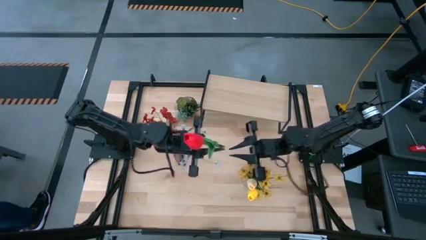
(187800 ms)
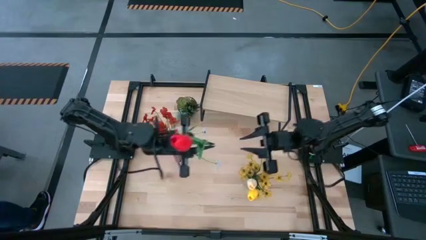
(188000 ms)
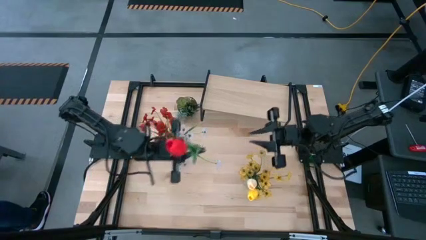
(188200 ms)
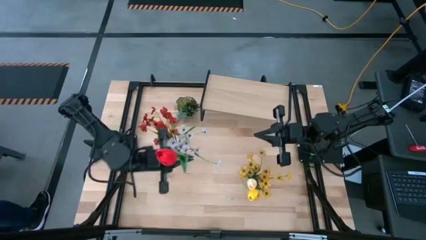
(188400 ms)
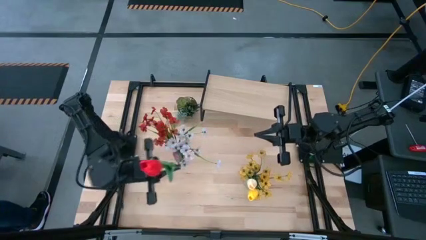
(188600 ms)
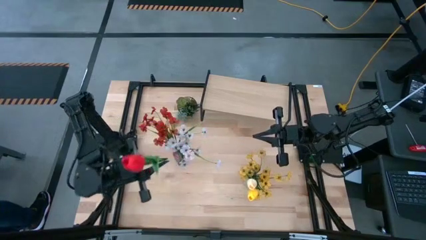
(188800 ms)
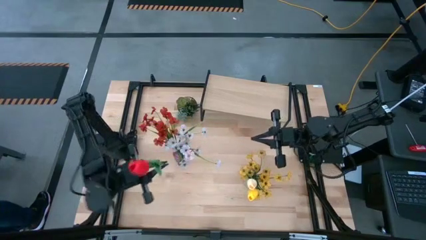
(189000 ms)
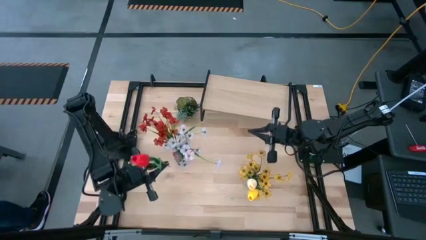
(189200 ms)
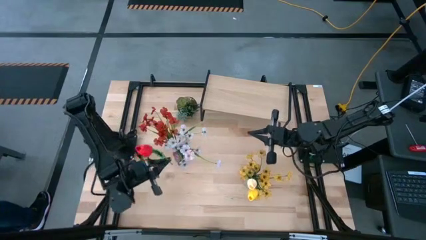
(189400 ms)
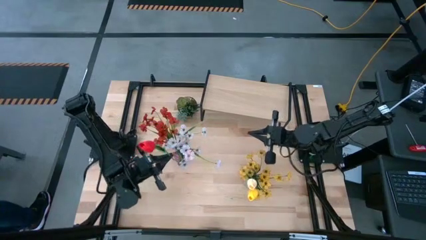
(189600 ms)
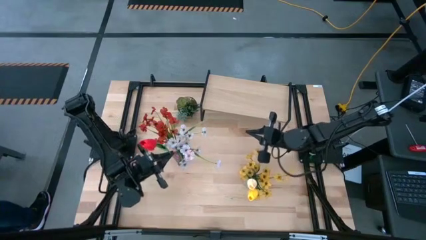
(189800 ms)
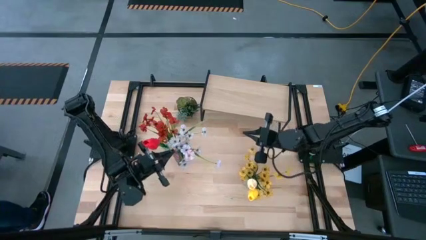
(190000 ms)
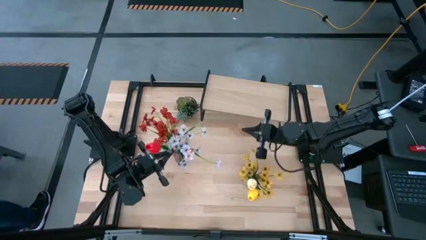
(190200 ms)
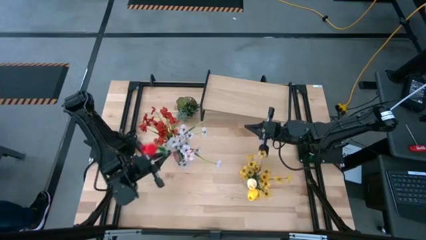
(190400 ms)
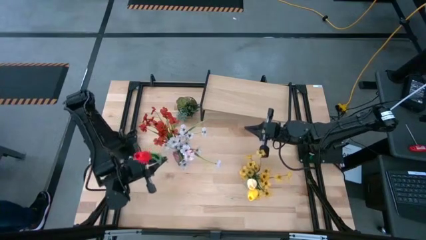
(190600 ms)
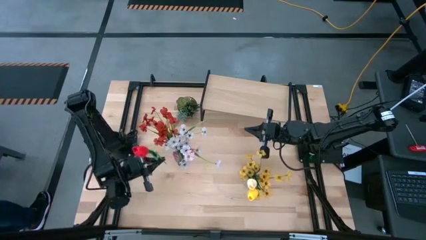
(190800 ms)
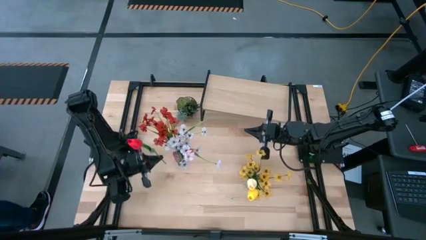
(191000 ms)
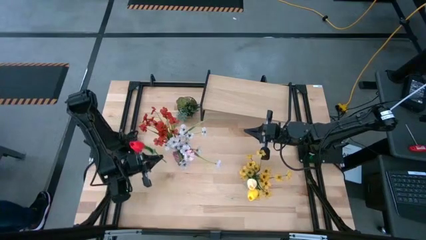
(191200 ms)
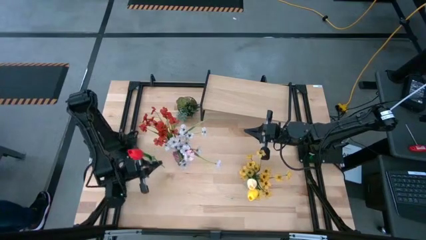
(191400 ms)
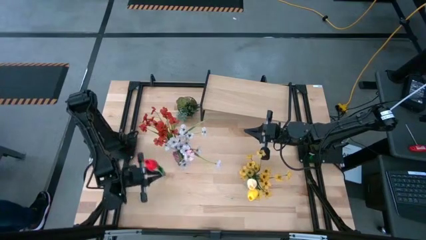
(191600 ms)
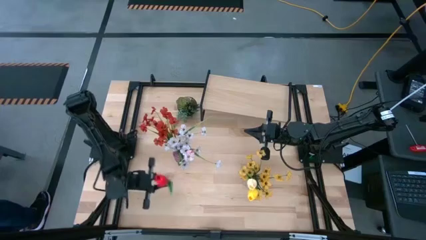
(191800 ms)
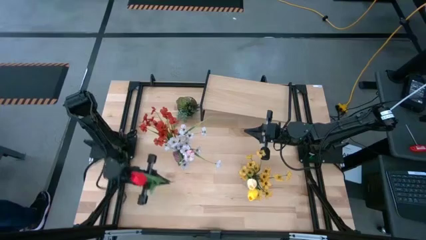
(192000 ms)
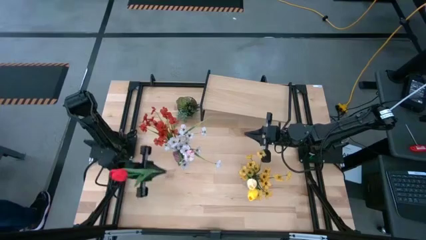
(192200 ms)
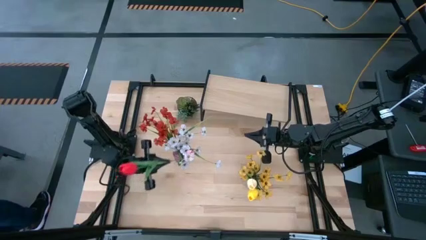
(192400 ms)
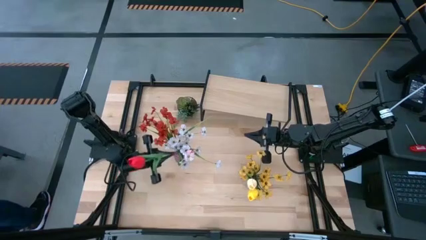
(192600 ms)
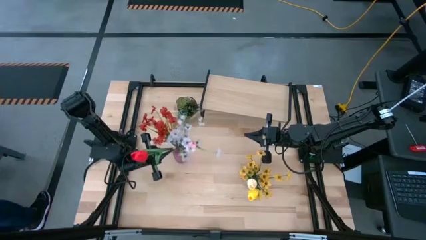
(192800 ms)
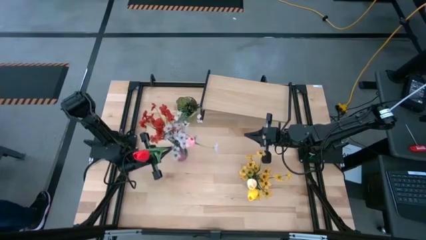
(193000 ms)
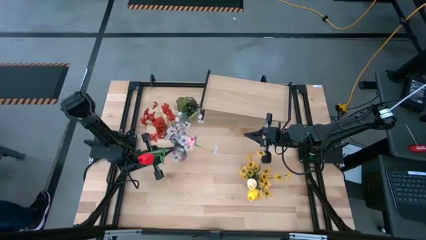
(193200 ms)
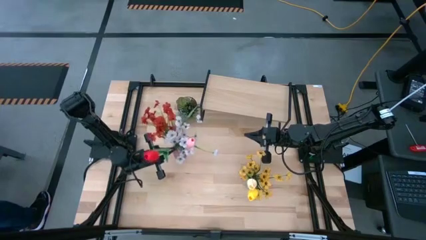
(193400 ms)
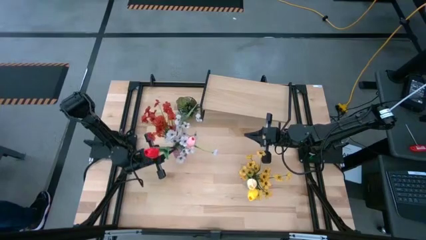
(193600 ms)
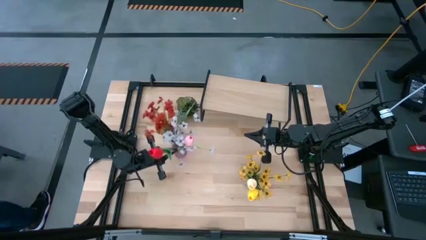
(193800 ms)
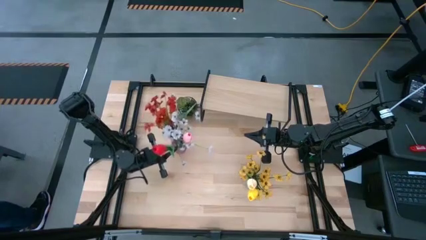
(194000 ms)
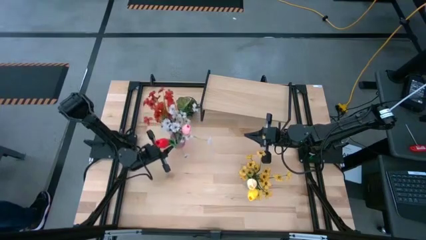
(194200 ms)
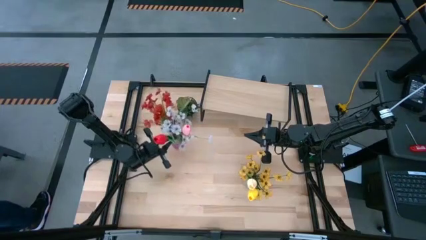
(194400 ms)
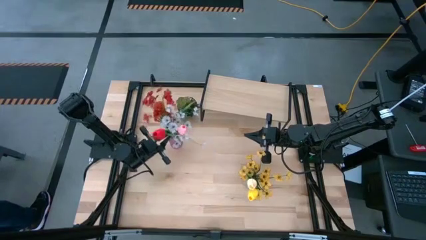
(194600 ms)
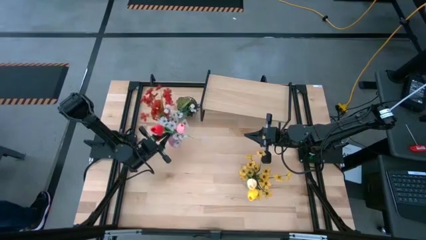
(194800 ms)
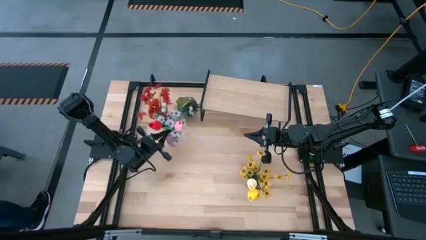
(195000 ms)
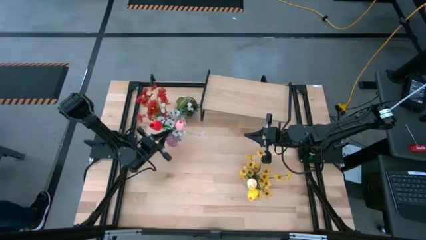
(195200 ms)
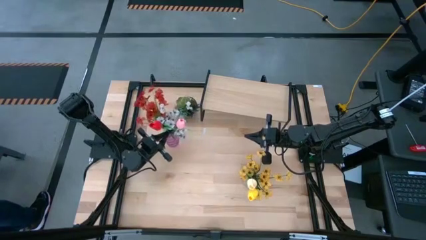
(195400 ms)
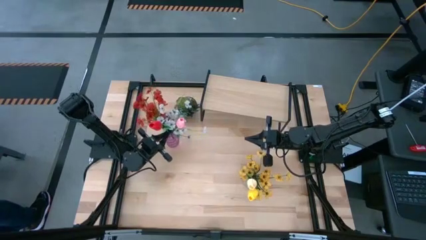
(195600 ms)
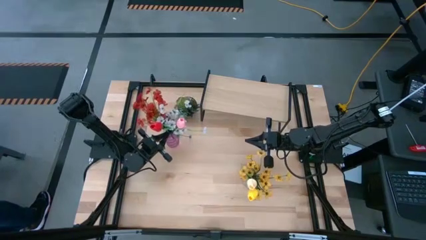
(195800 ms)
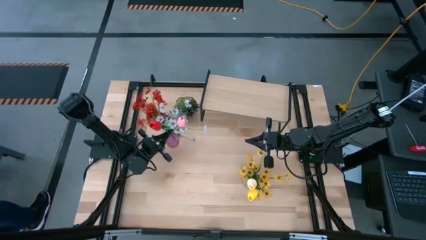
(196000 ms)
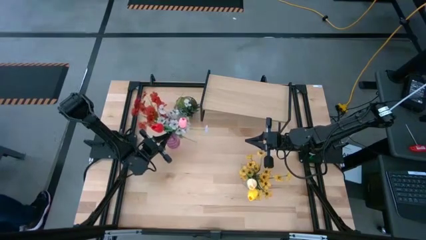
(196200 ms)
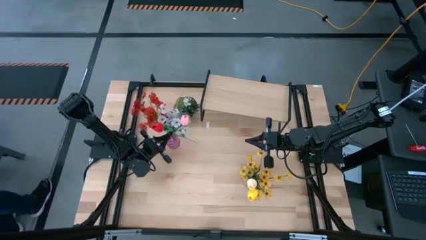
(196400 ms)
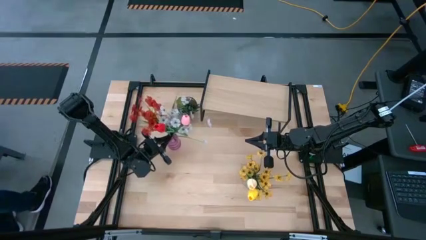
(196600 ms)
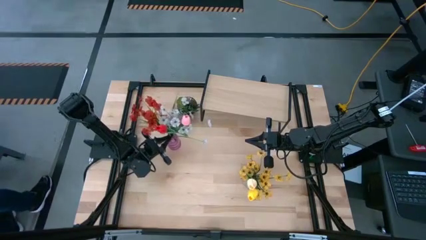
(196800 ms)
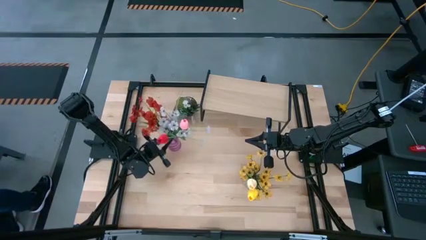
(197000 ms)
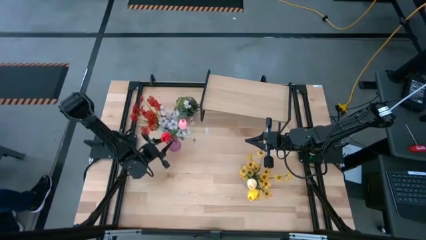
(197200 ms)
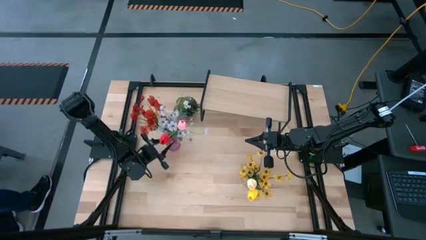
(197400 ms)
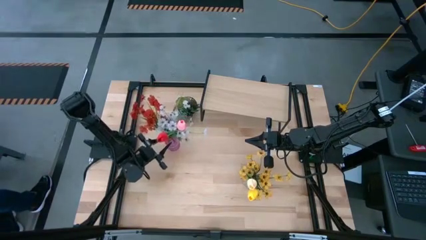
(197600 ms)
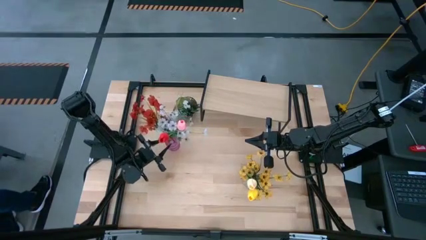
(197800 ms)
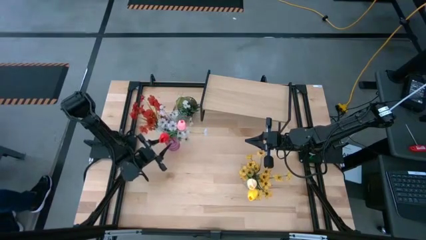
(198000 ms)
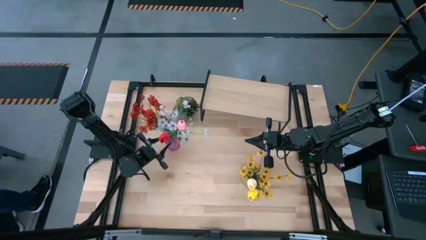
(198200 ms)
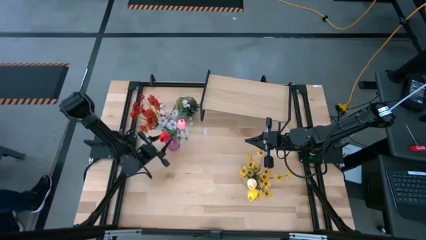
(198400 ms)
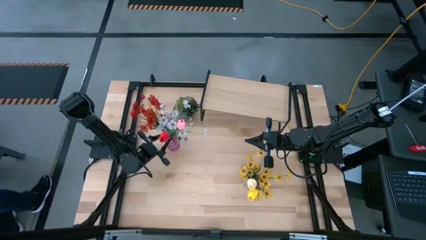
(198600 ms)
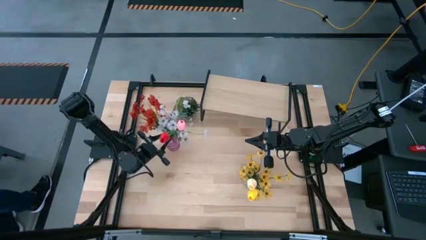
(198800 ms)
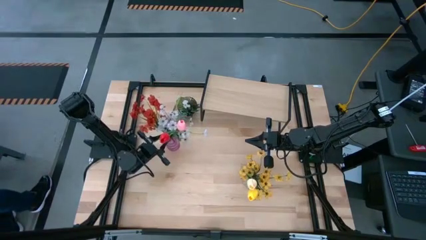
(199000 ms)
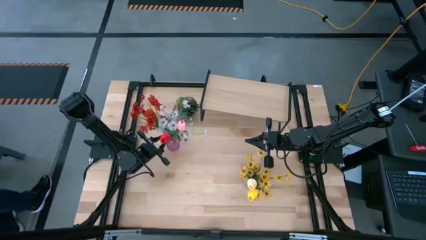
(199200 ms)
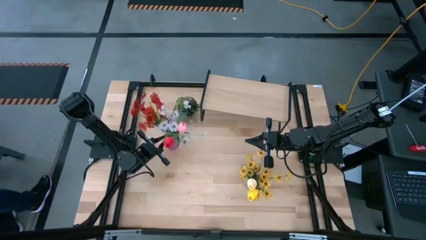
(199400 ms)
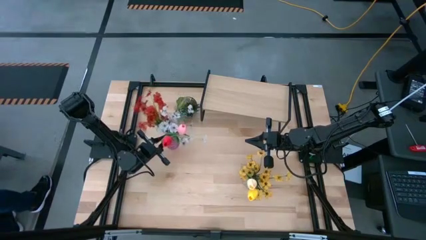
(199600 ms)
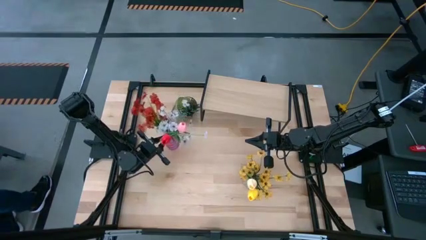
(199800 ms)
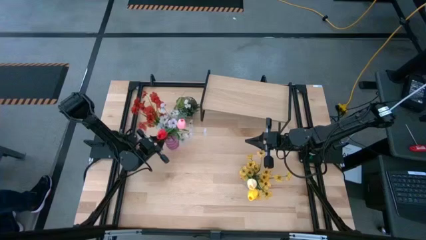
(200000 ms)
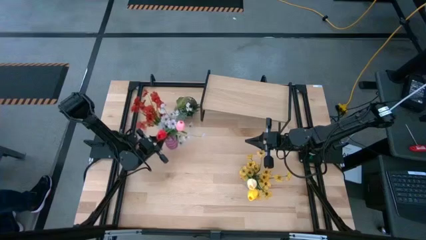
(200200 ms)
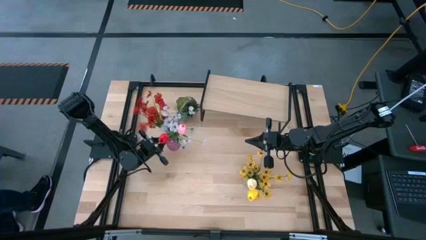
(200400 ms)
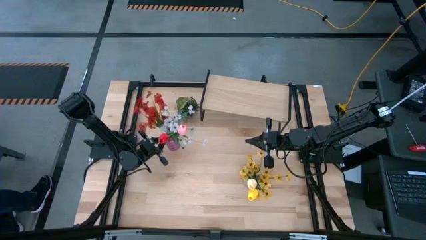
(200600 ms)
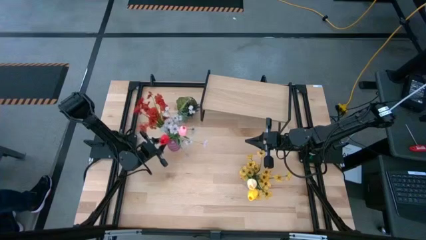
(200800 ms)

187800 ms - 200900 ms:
Task: Pick and place flowers into a vace then onto a shelf
Put the red flower into the violet vase

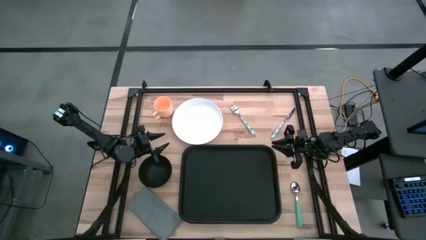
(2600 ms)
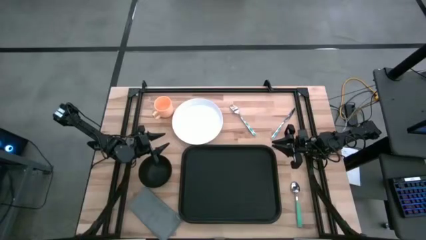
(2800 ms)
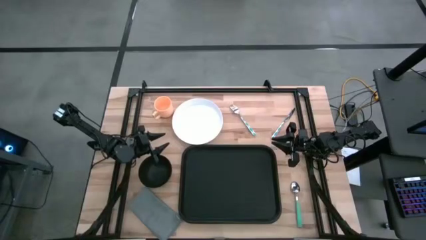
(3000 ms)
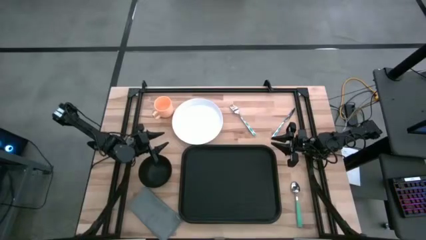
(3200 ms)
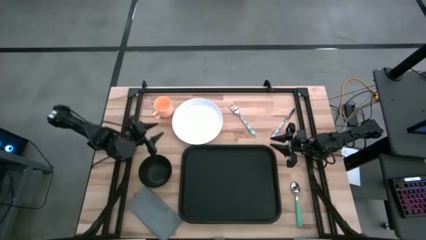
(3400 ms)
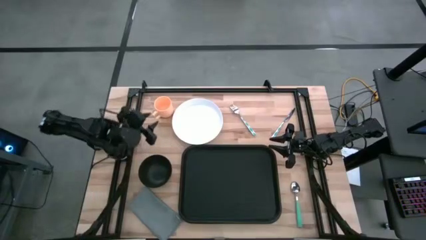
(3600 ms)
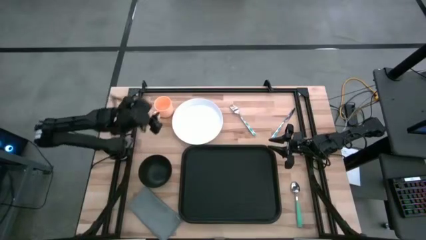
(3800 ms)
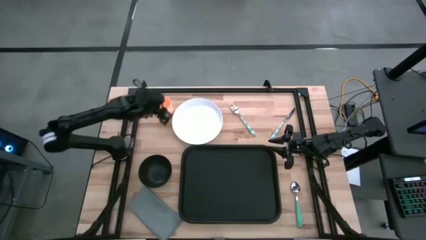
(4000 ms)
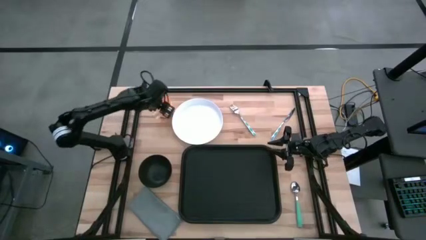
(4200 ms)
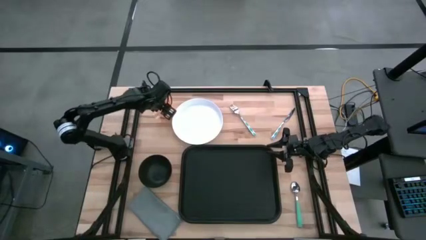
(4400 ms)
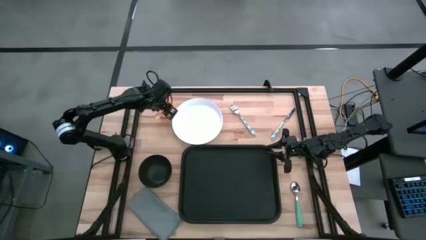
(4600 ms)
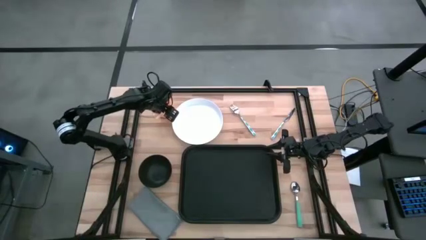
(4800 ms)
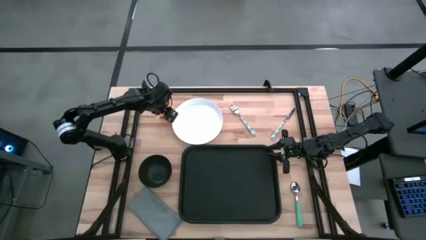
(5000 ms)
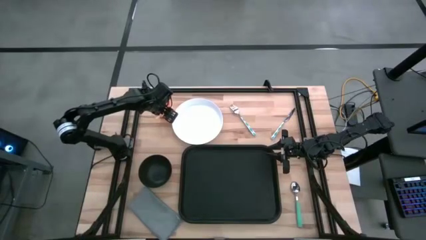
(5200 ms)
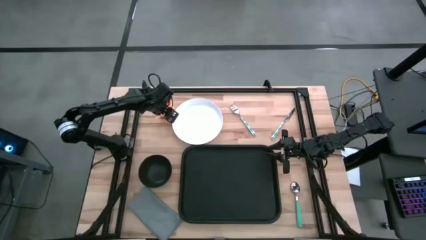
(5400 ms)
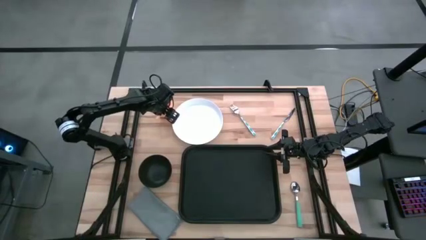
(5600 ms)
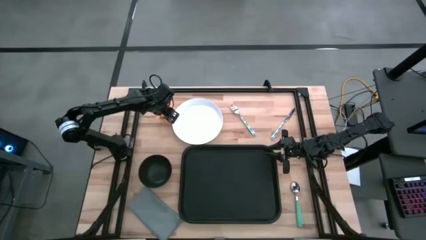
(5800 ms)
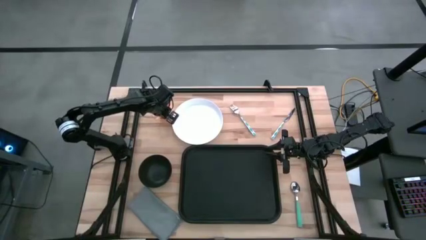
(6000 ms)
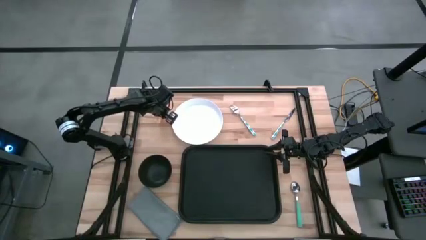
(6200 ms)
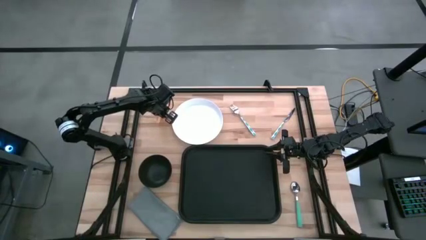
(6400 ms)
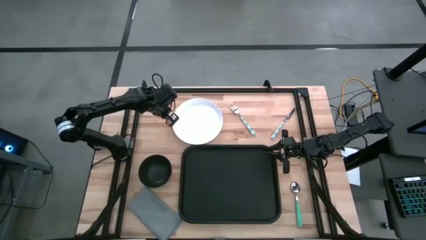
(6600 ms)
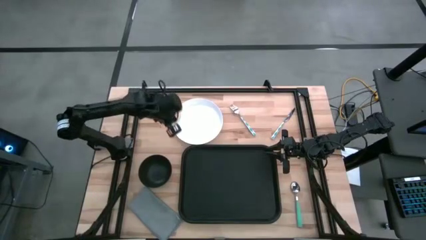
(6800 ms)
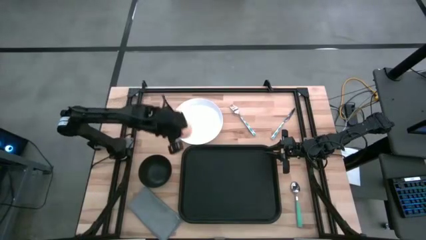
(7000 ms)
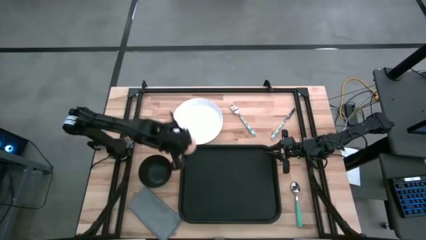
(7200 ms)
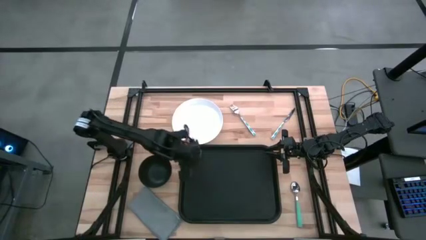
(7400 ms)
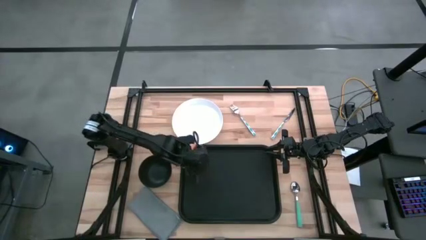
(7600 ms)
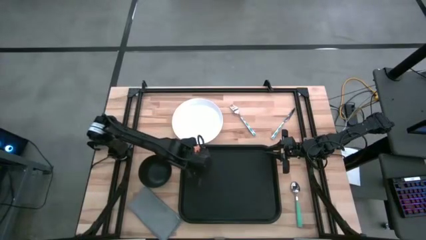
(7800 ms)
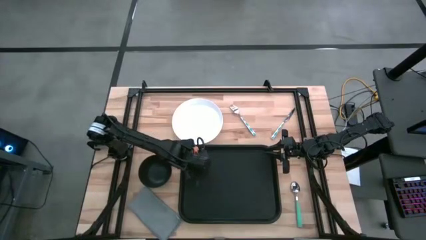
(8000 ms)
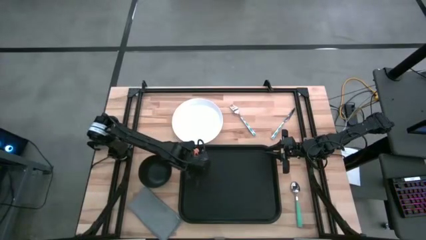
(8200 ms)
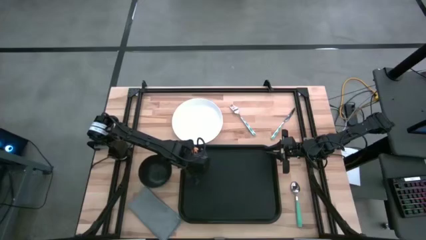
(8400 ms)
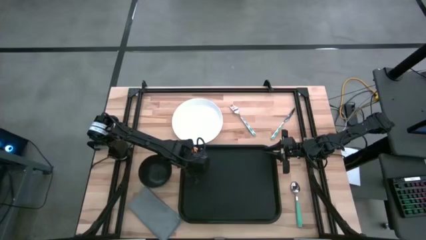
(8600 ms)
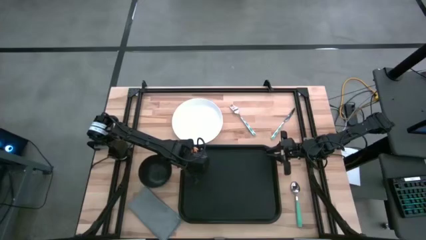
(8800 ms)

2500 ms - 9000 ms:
Task: Set up tray
Put the yellow mug on the black tray
